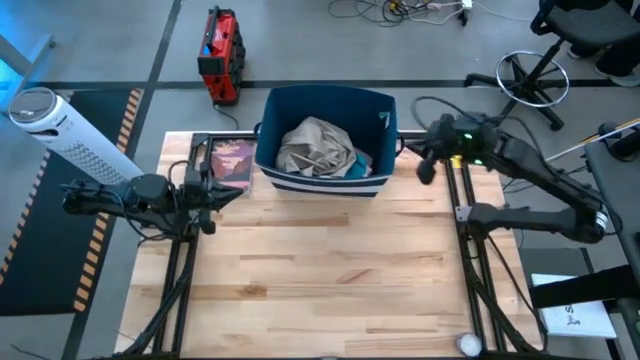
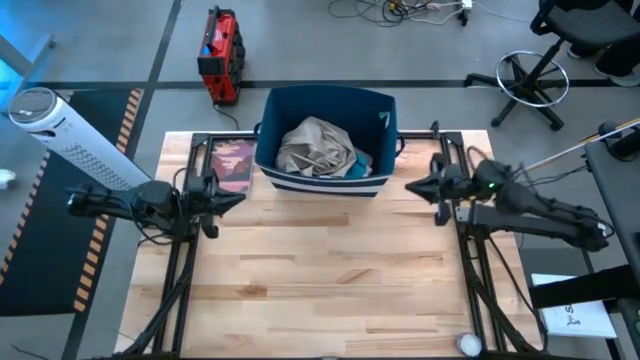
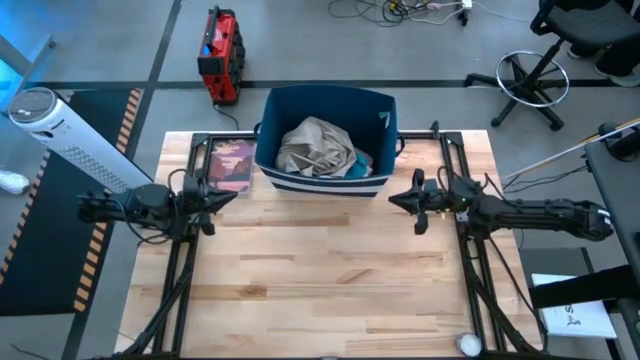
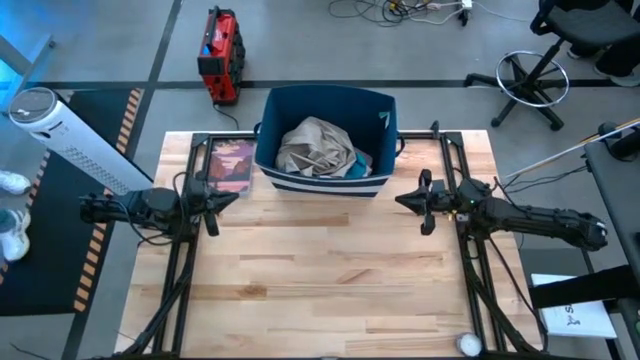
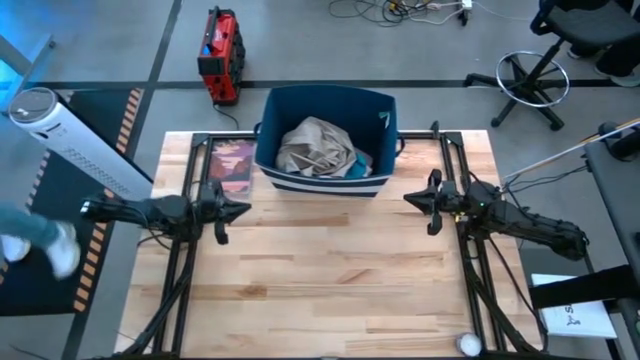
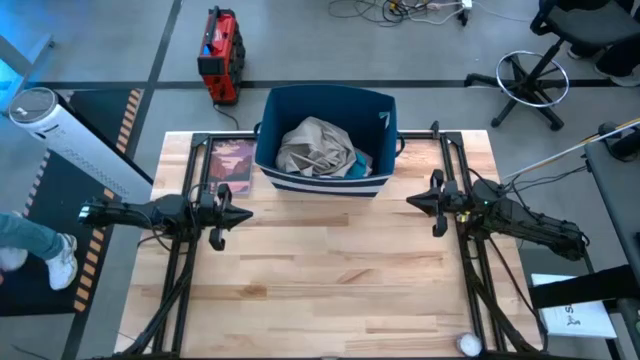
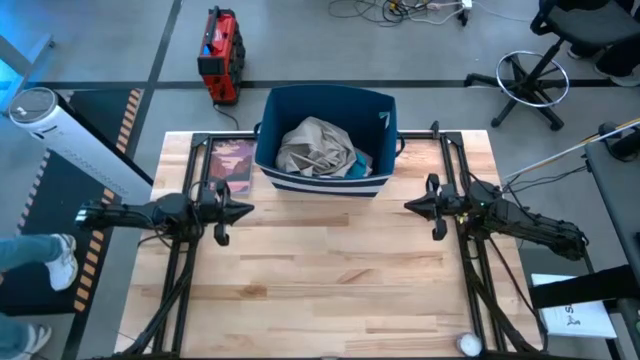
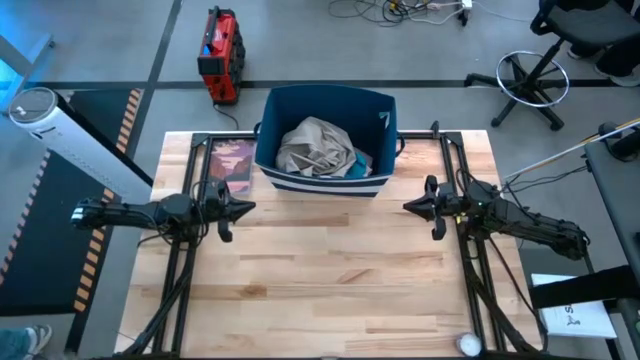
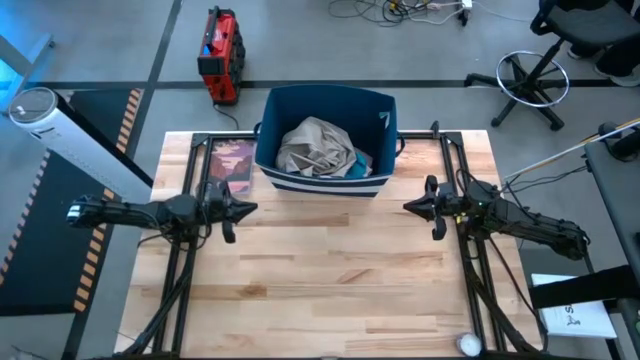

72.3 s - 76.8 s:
Task: Sort clothes
Return to Home Position

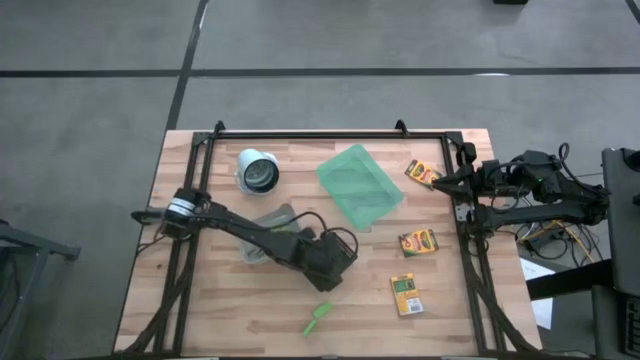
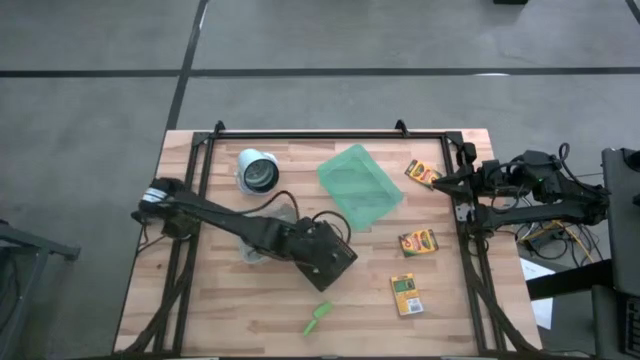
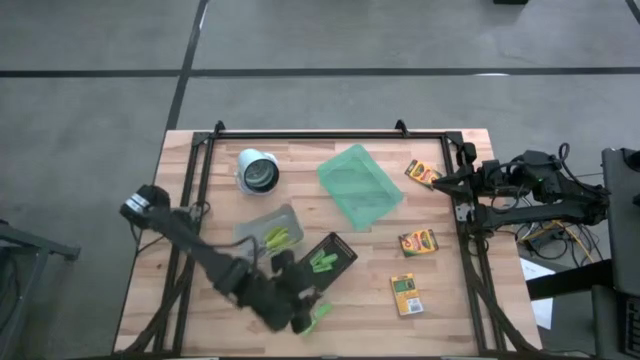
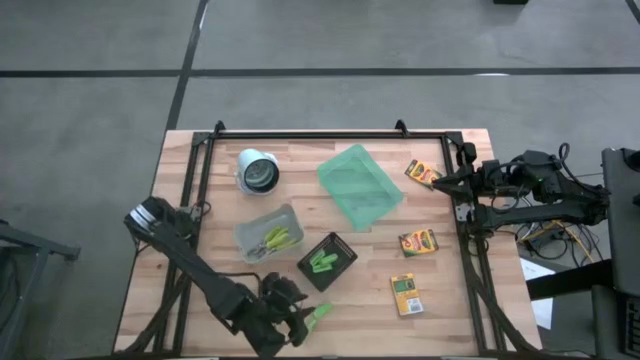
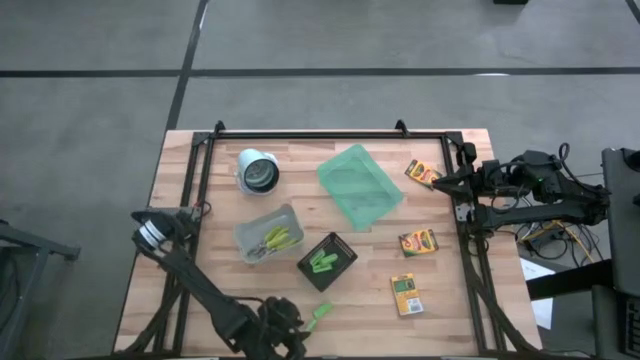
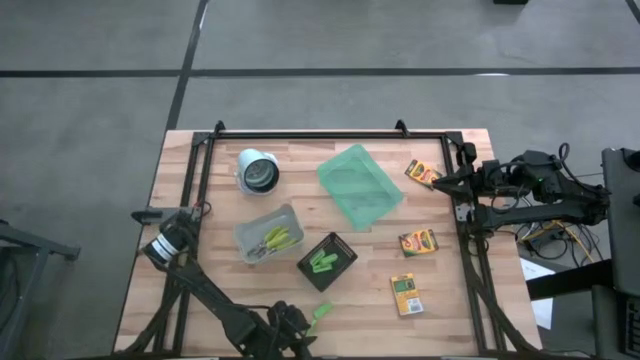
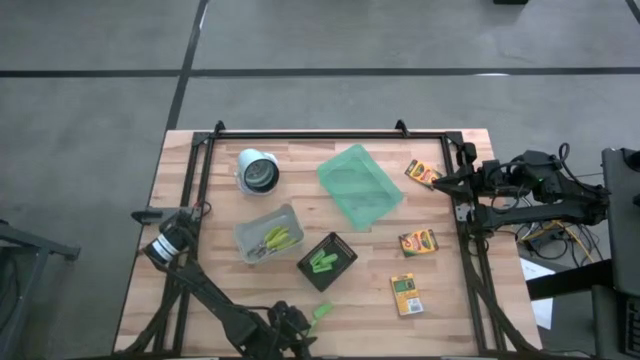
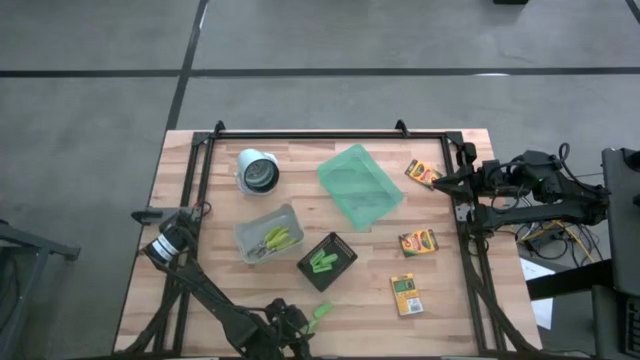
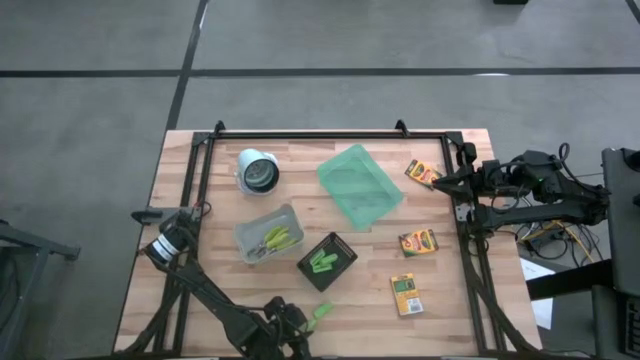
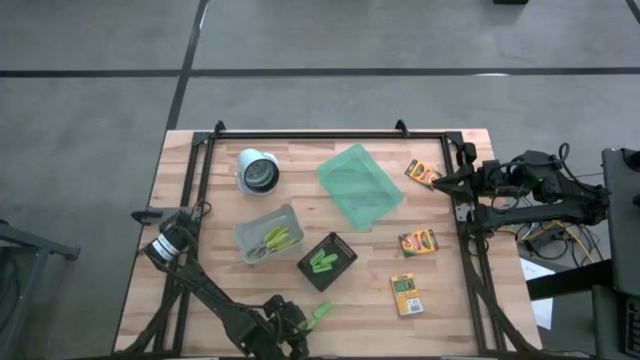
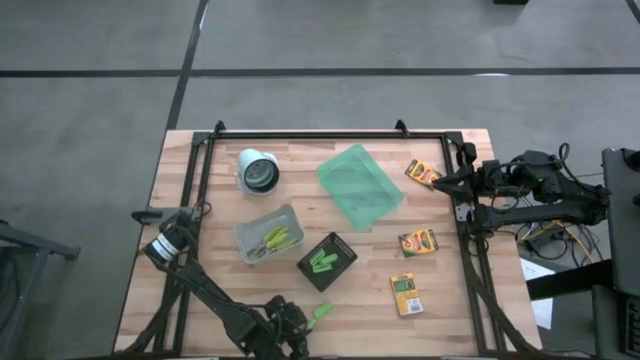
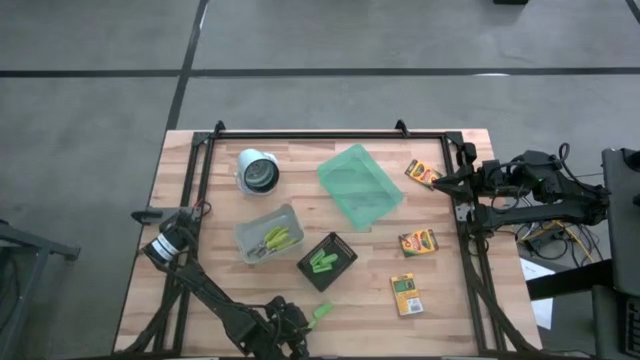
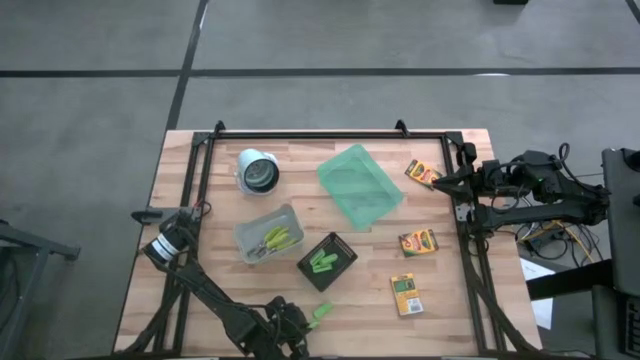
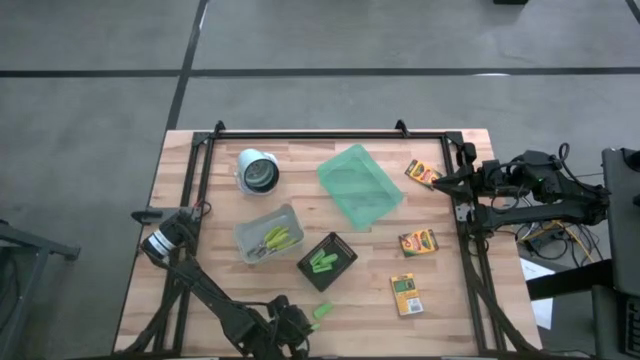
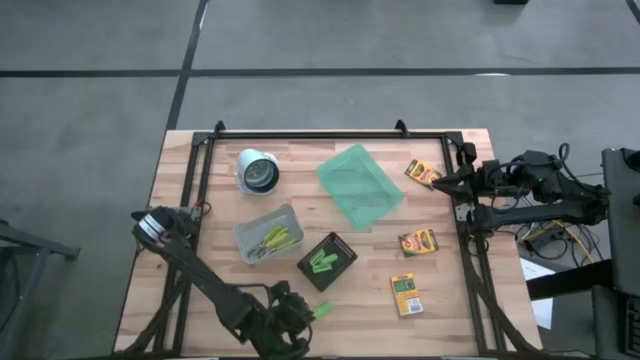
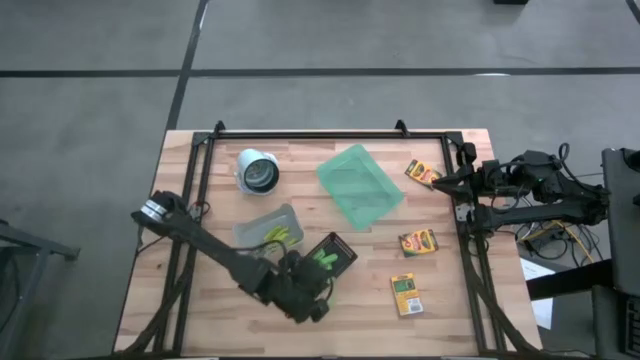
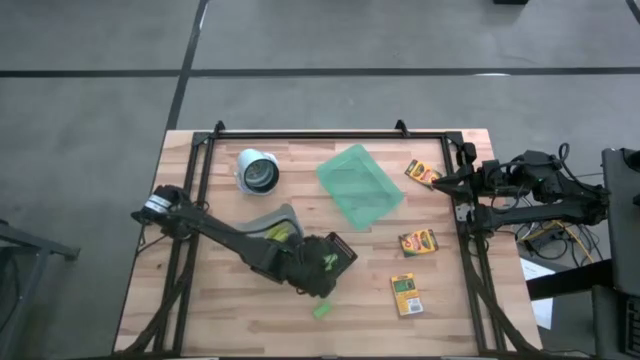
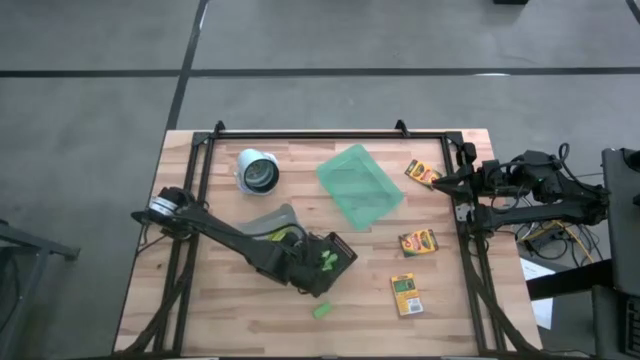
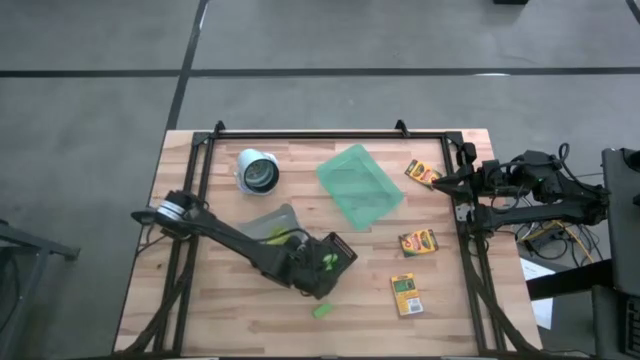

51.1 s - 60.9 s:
Task: Pick & Place School Supplies
Put the green eraser into the black bin

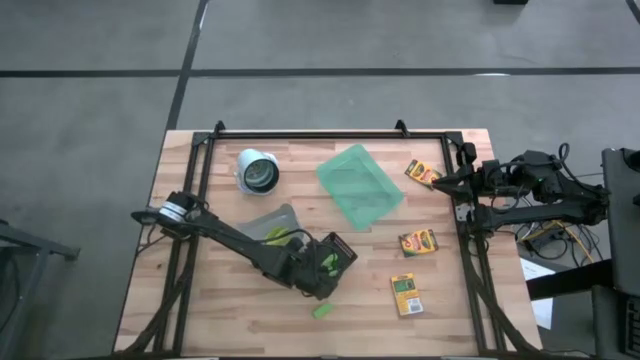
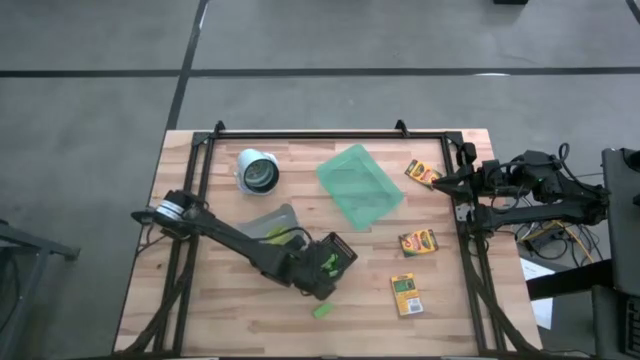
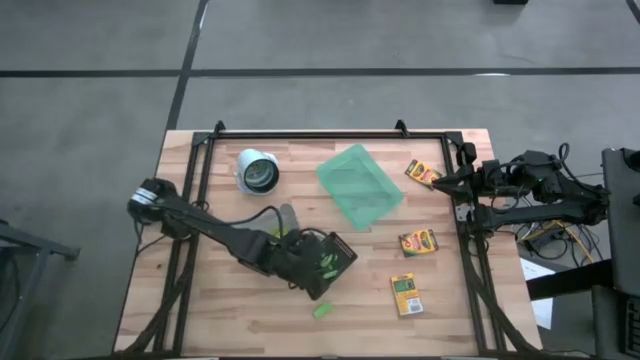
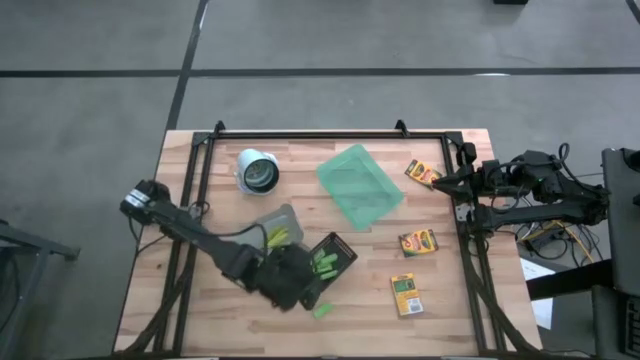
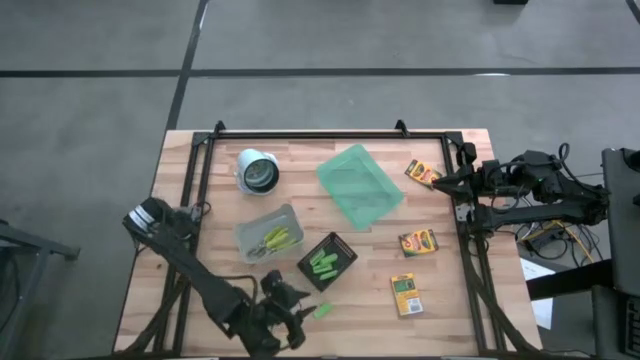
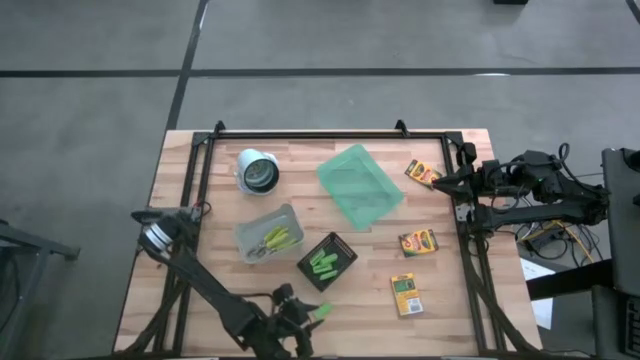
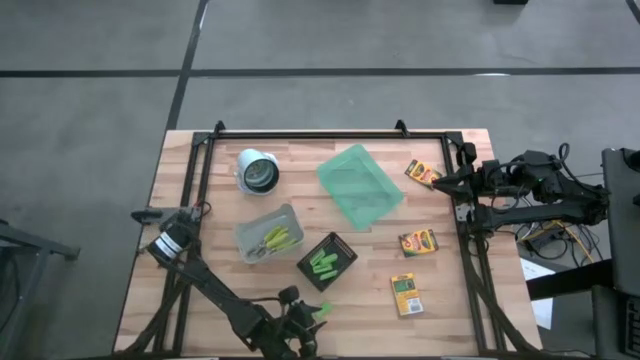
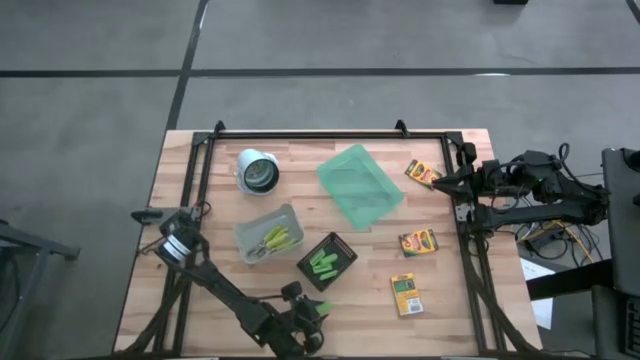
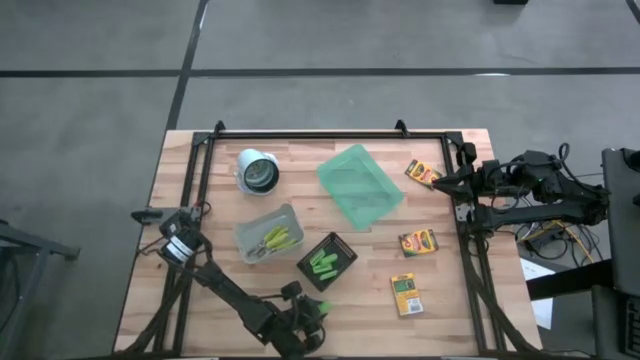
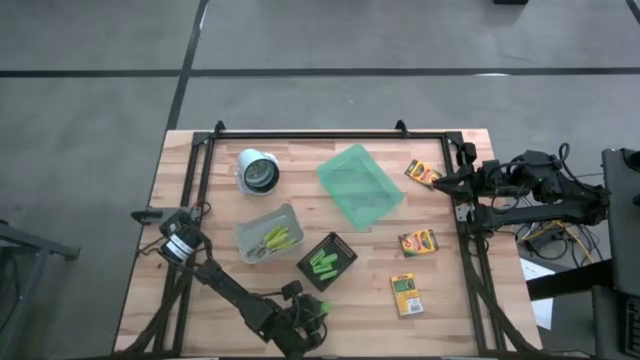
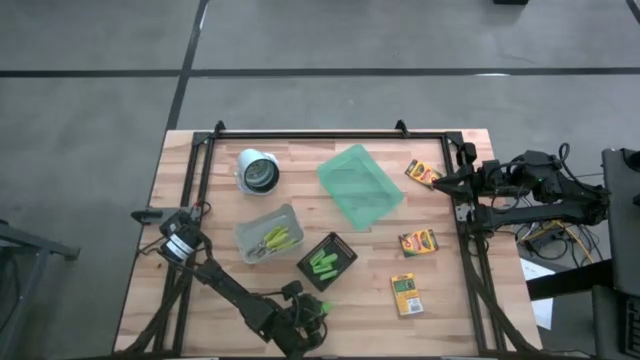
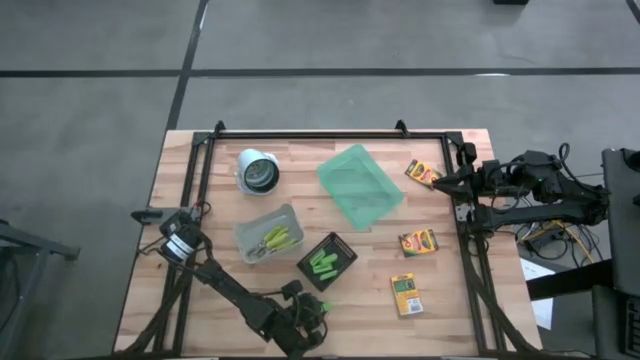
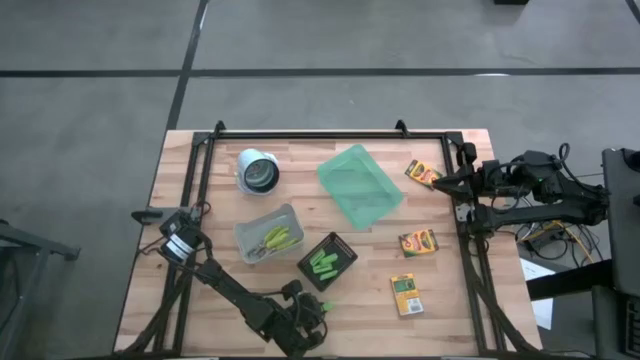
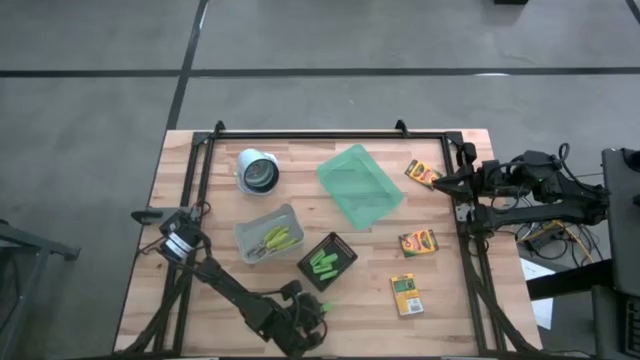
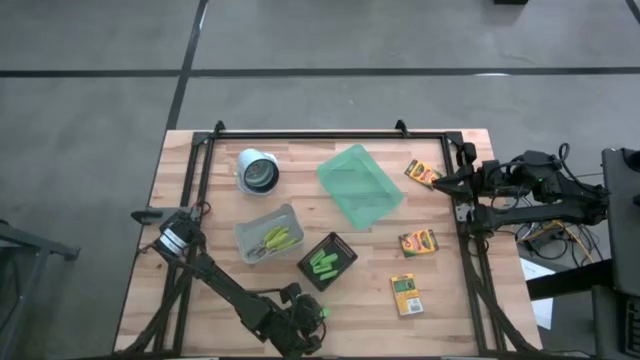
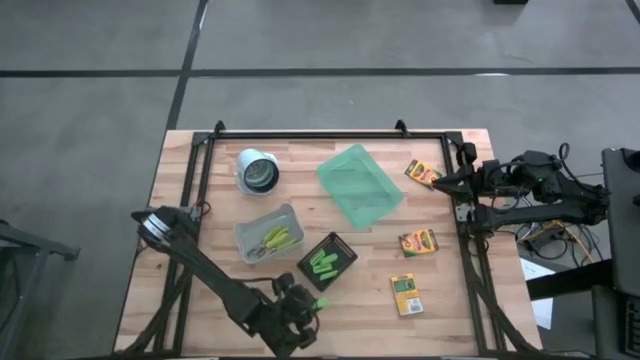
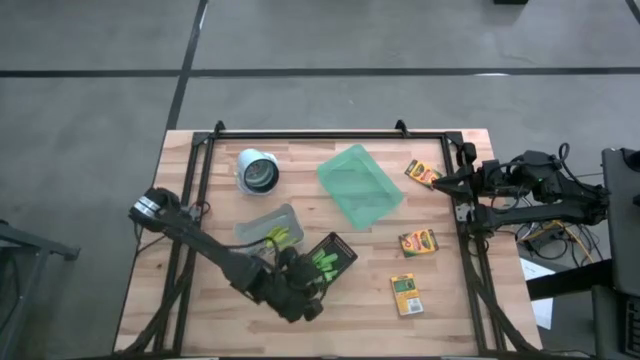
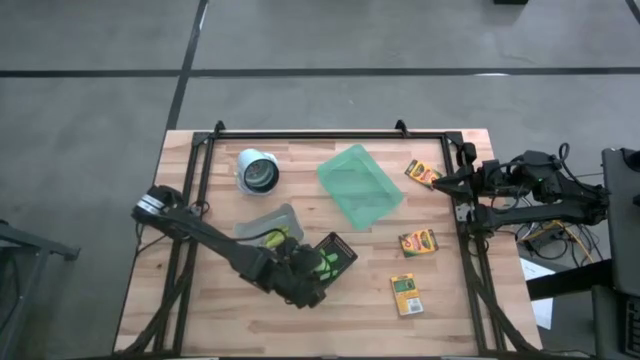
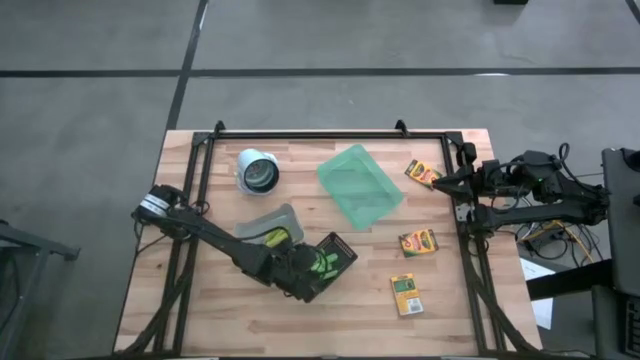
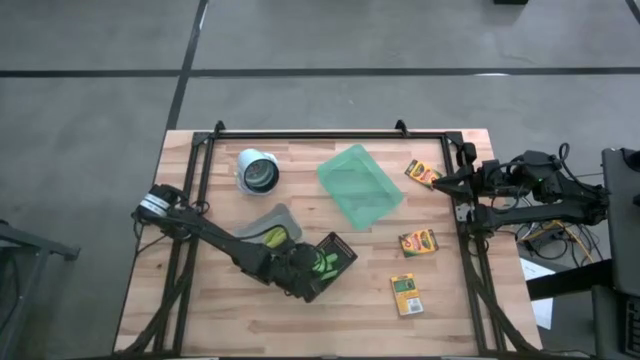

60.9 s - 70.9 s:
Put the green eraser into the black bin
